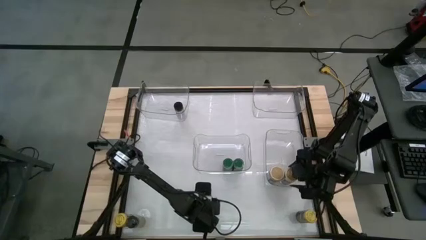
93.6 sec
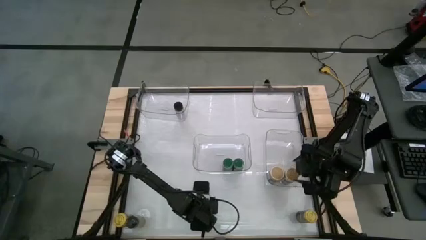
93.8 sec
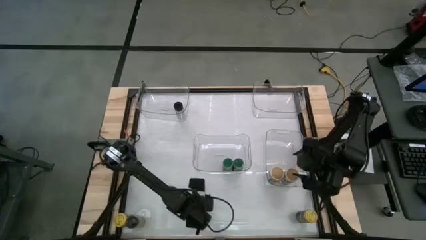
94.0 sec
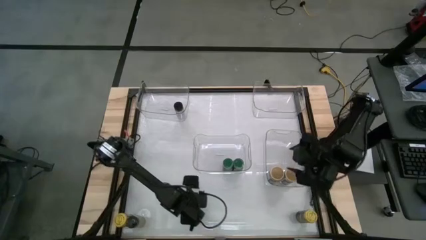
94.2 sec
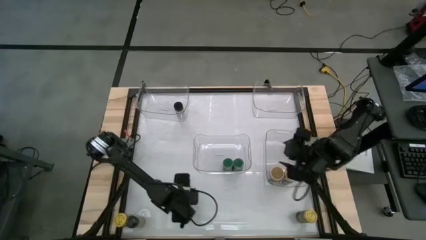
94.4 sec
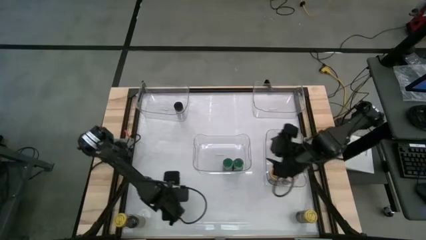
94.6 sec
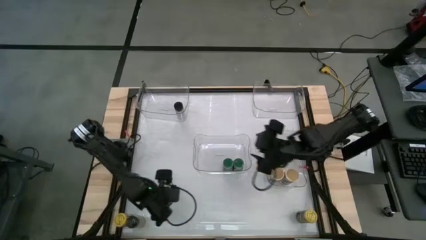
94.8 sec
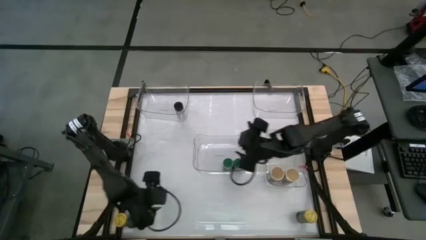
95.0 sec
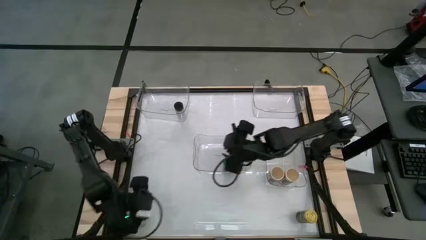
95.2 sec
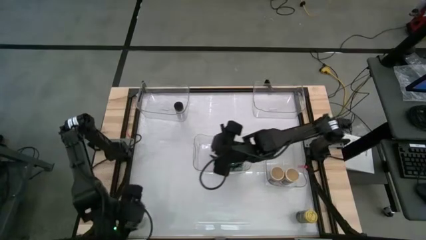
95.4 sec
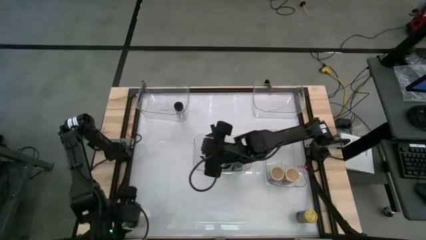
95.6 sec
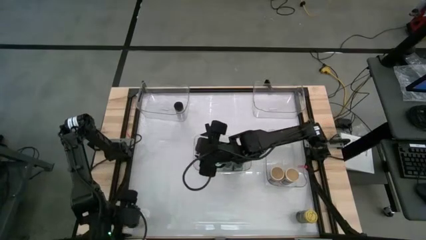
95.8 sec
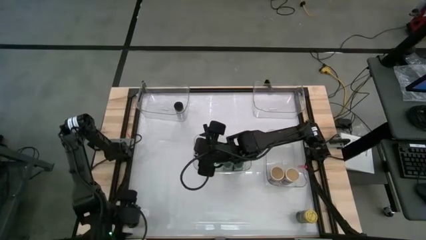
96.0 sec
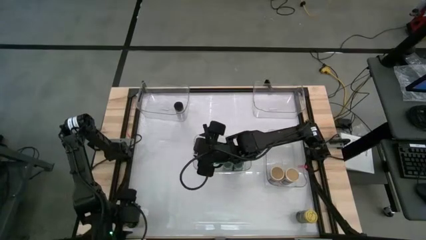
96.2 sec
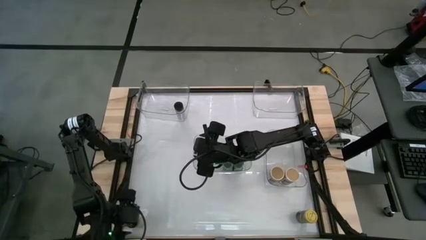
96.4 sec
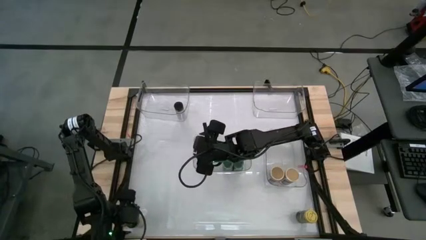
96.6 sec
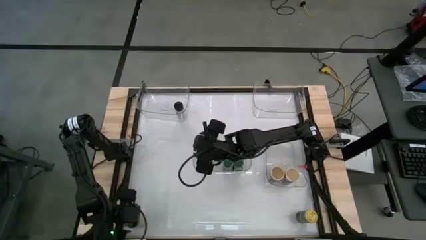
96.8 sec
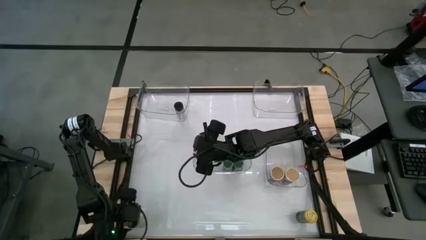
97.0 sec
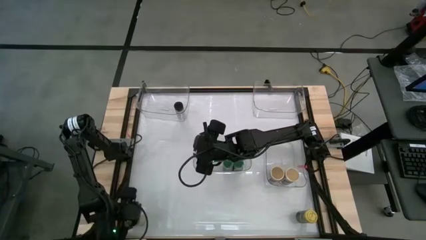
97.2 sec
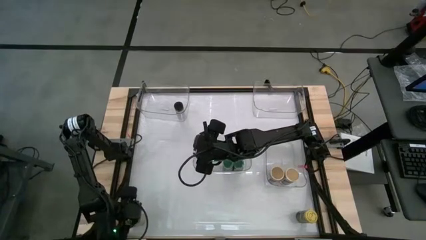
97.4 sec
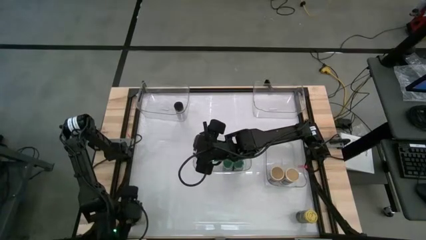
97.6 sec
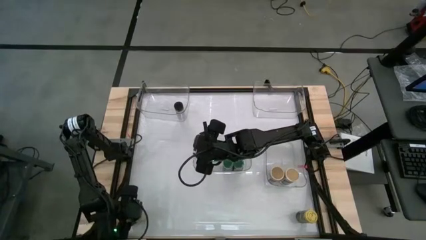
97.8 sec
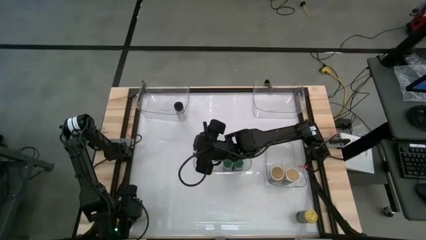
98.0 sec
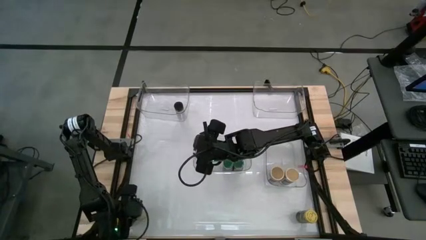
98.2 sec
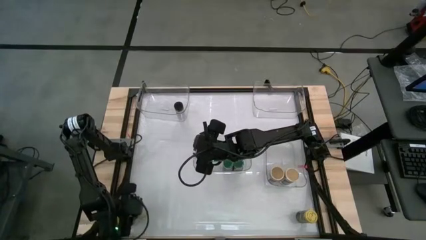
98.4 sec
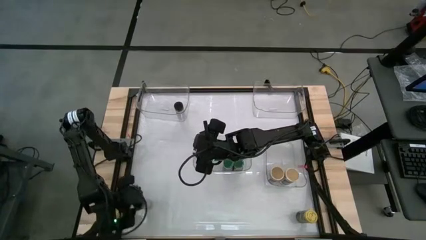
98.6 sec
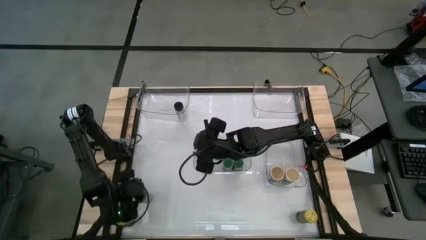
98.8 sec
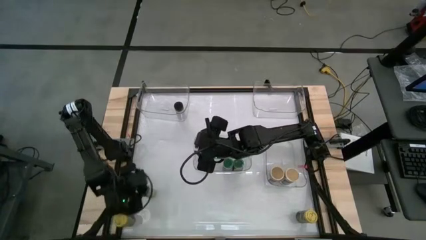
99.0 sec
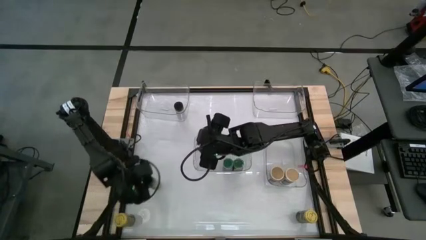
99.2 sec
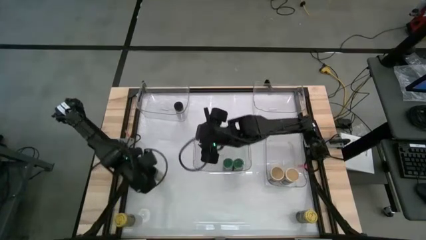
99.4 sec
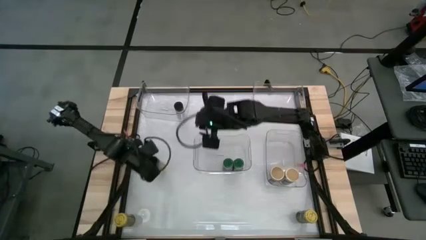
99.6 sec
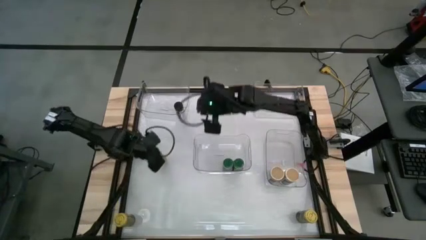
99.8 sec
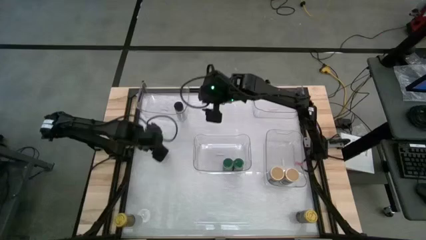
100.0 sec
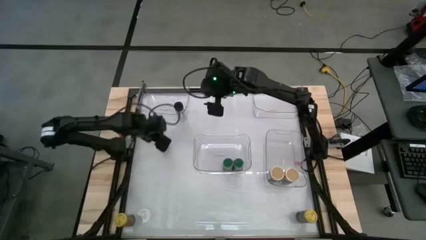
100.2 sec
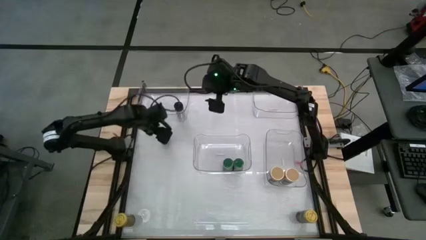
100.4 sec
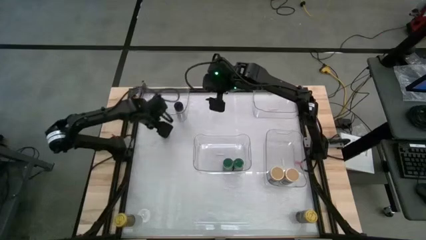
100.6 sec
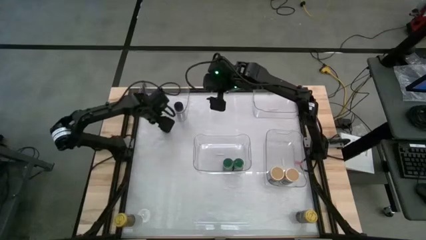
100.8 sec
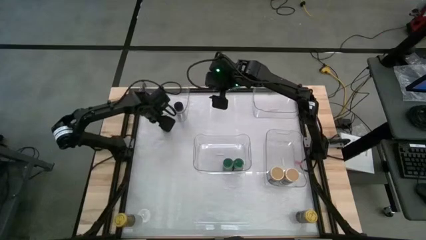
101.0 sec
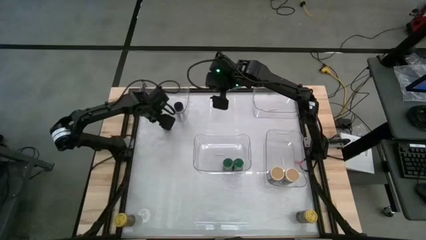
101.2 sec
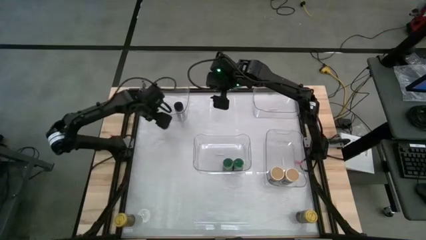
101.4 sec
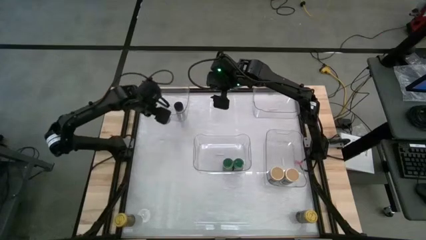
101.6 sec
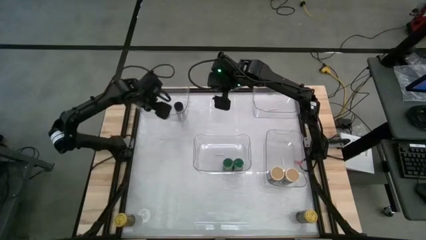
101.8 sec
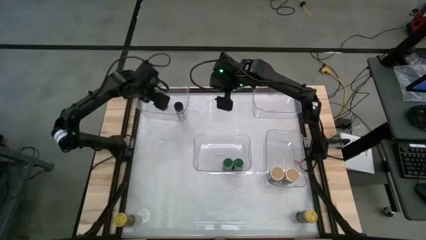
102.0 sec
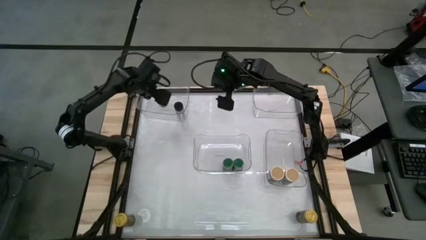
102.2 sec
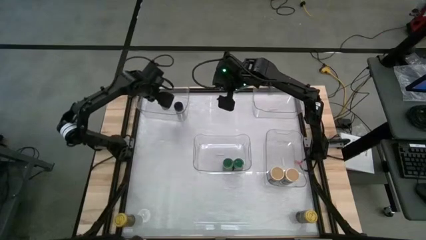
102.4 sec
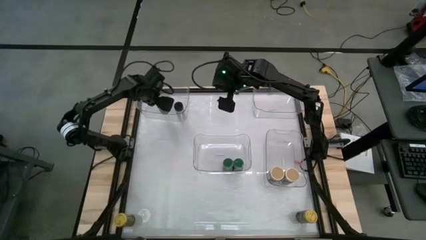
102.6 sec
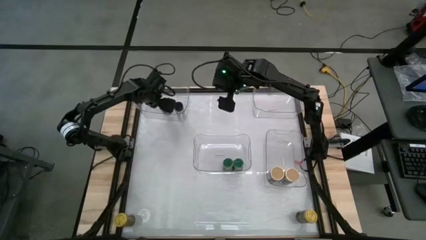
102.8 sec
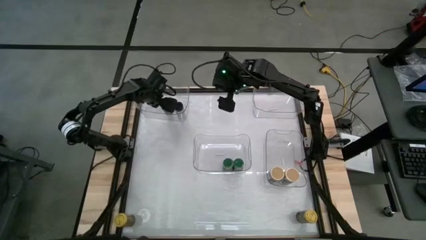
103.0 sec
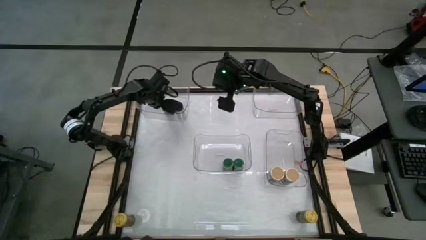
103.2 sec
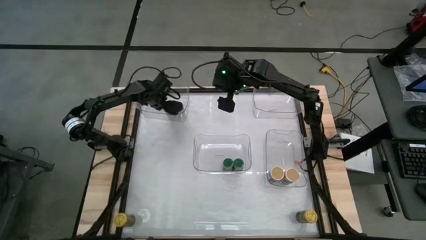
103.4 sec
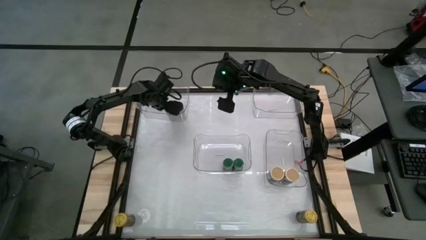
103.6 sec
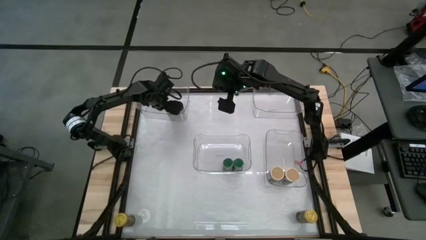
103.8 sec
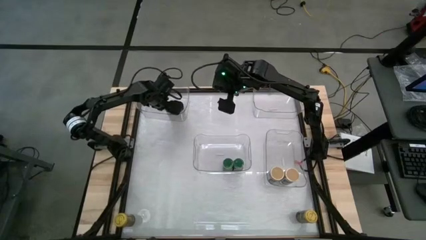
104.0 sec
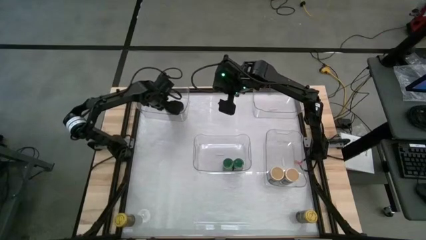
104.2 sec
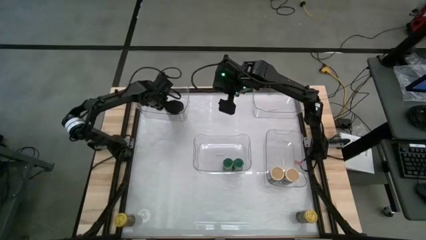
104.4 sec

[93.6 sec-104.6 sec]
Task: Sort spices by type
Put the black seasoning bottle into the top left transparent bin

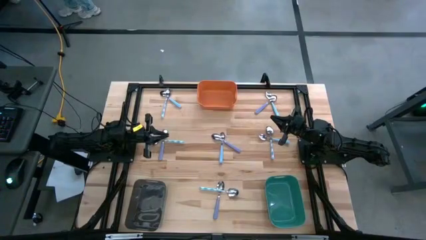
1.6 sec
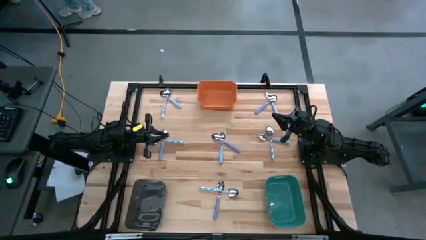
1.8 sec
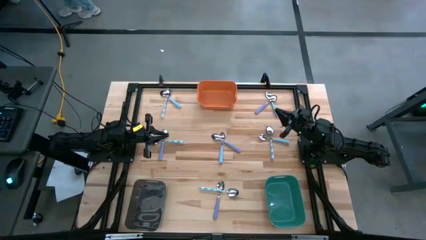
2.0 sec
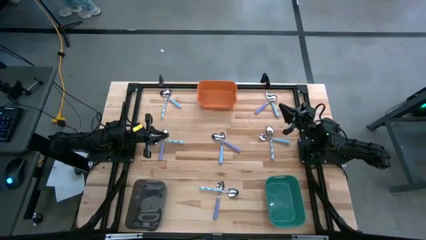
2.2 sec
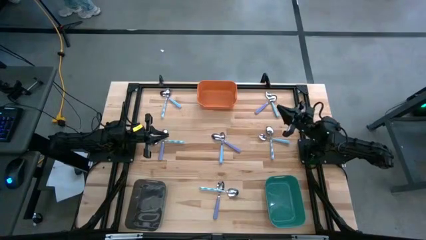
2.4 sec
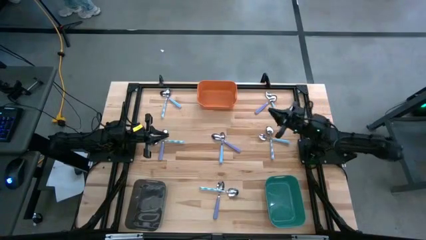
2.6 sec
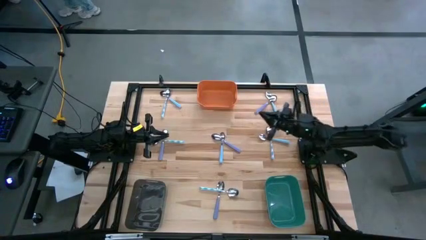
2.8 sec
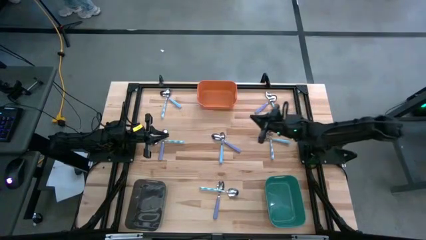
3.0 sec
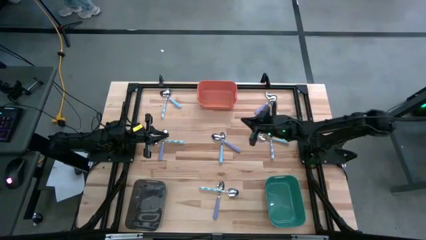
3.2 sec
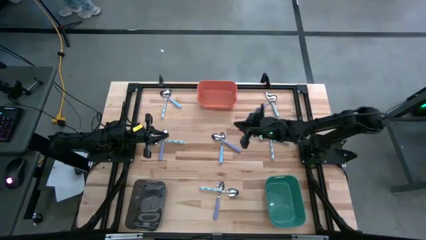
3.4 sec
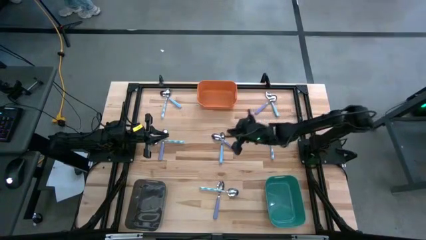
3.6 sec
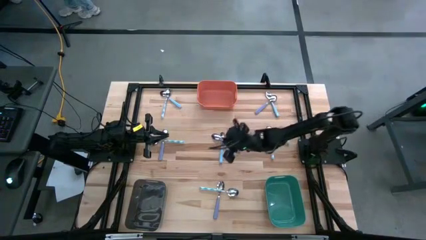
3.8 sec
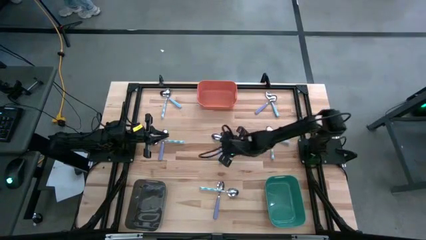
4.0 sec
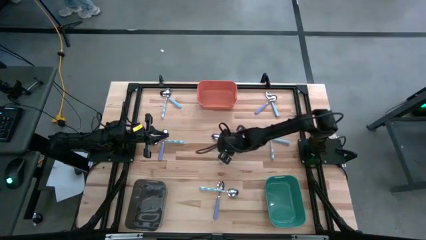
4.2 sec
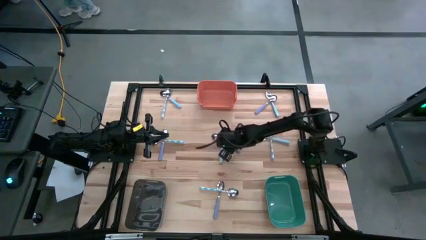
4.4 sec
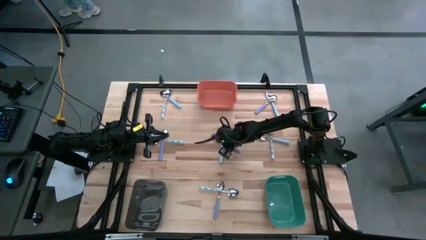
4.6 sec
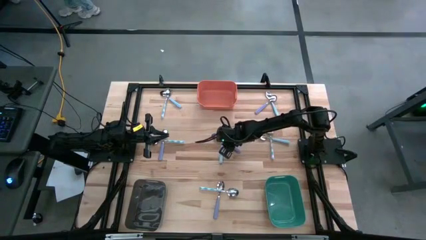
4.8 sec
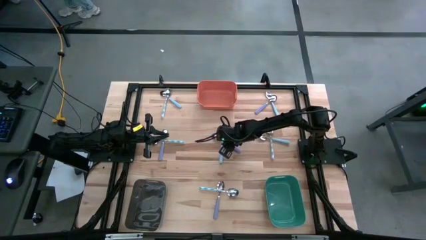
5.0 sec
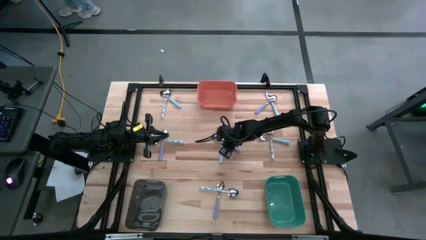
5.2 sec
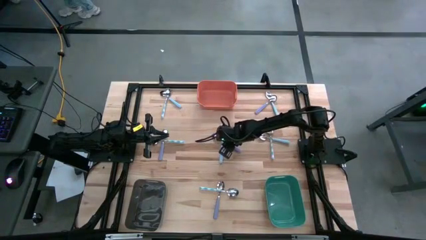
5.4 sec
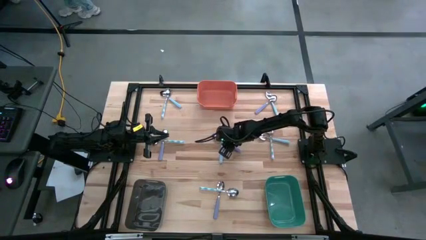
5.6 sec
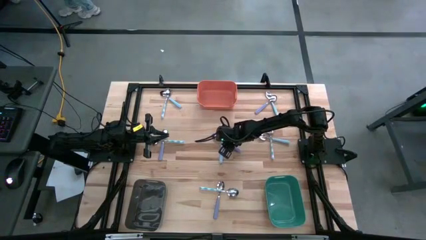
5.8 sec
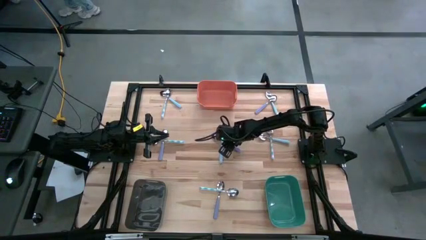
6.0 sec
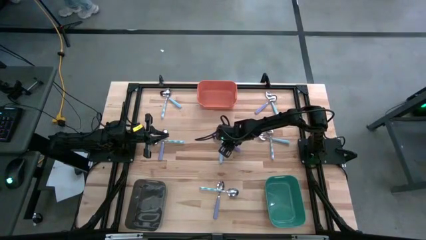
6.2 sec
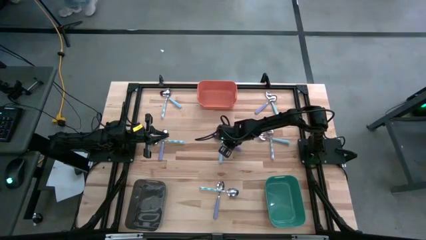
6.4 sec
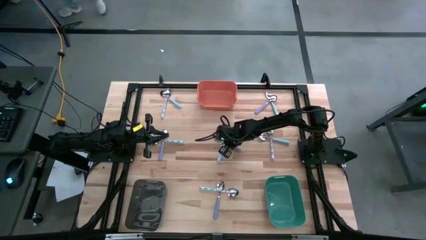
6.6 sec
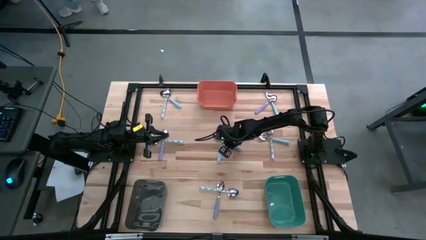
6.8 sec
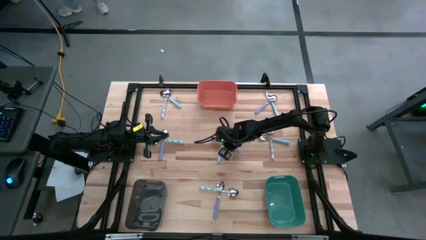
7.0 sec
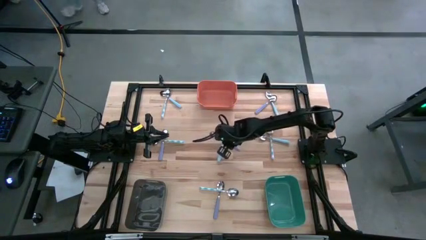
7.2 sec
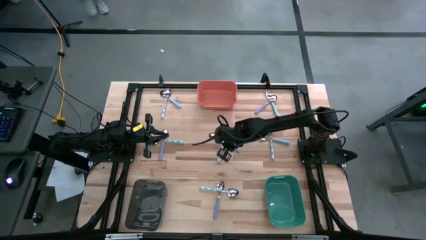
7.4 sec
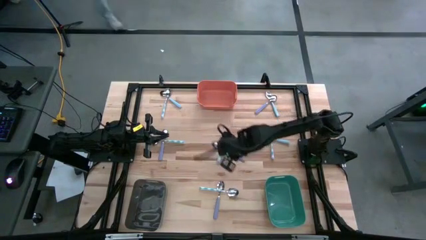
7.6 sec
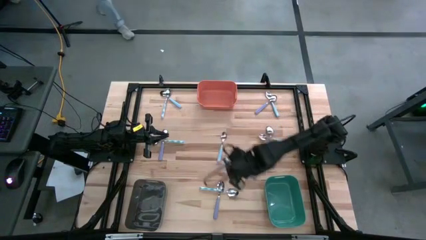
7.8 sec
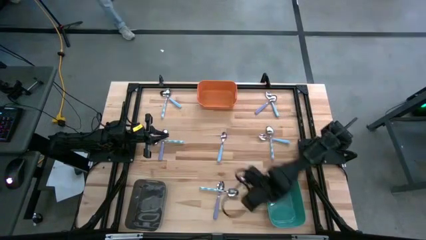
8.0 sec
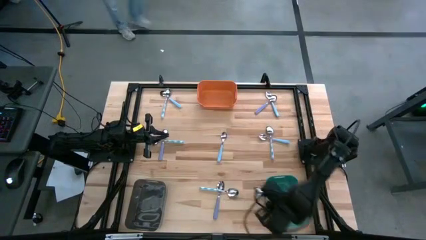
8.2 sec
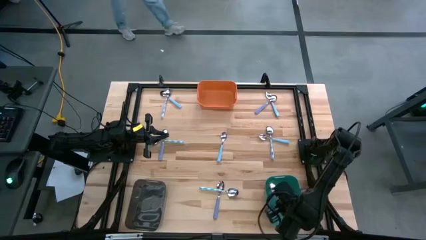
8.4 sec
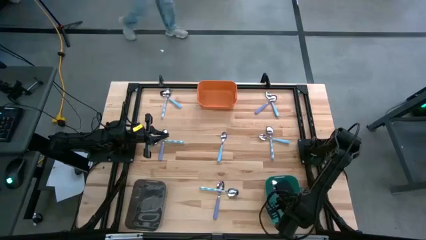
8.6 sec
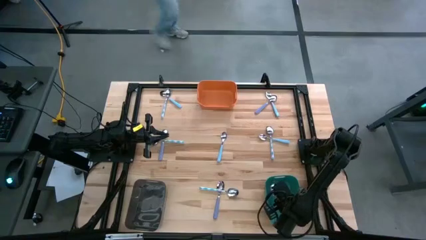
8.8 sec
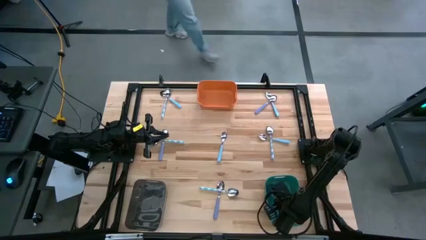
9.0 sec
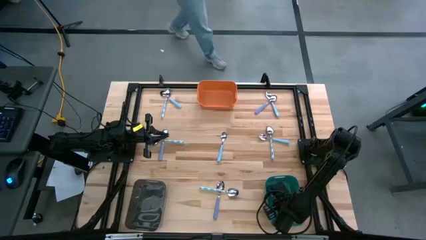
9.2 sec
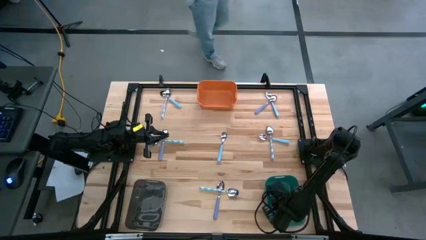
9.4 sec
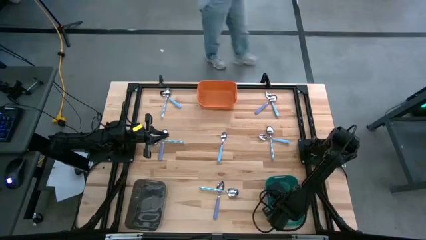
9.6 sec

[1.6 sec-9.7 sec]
Task: Sort silverware by color (type)
Put the center violet spoon into the green bin
